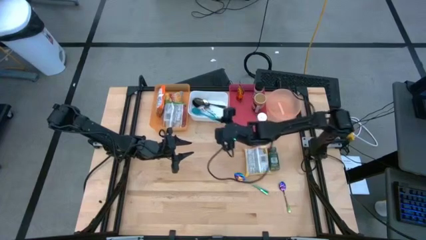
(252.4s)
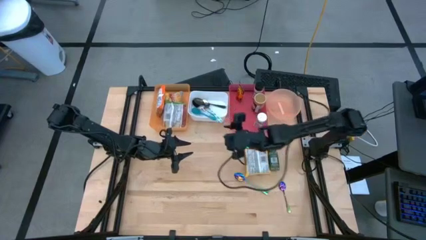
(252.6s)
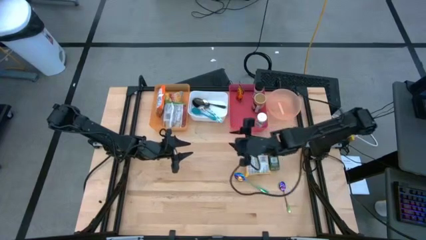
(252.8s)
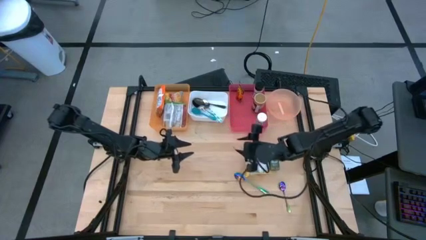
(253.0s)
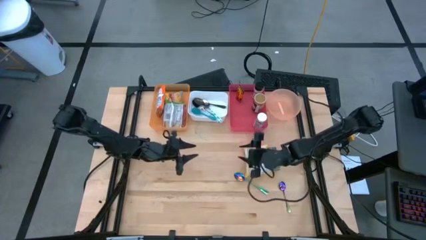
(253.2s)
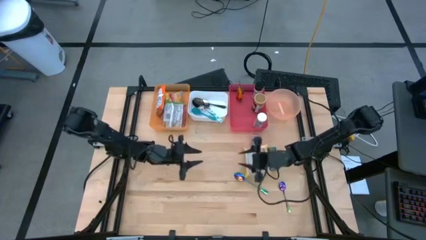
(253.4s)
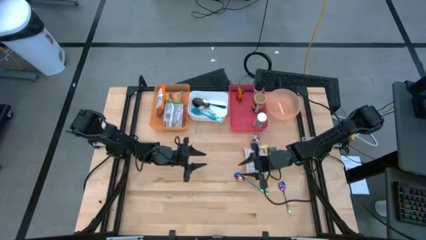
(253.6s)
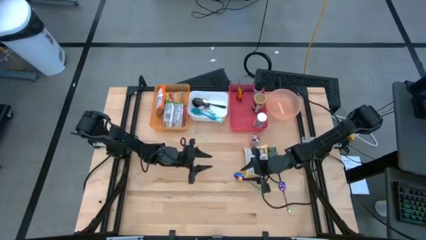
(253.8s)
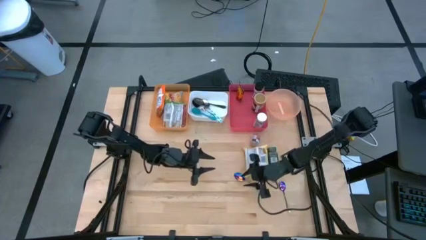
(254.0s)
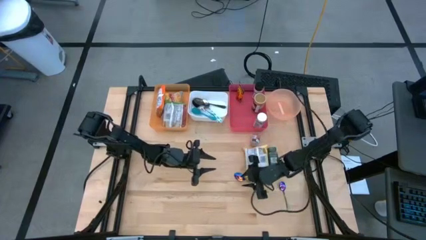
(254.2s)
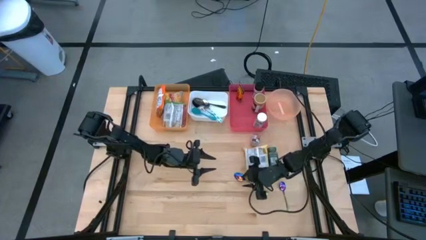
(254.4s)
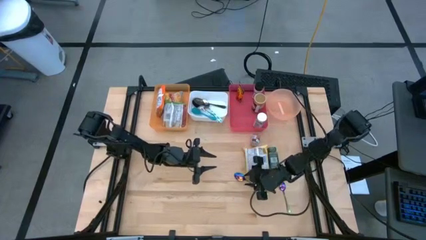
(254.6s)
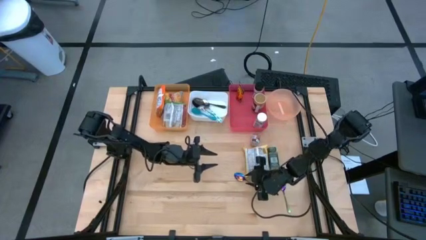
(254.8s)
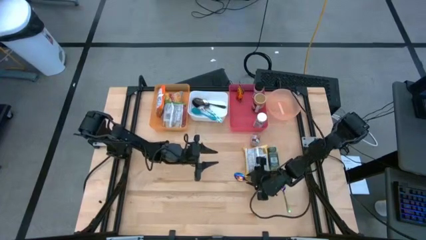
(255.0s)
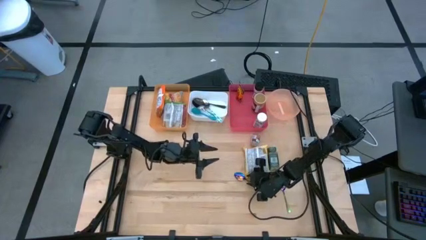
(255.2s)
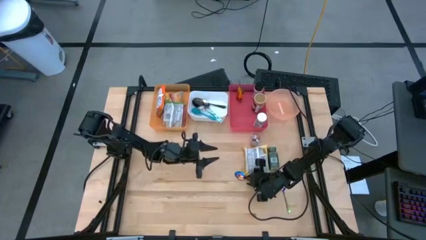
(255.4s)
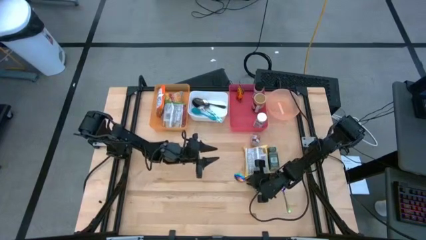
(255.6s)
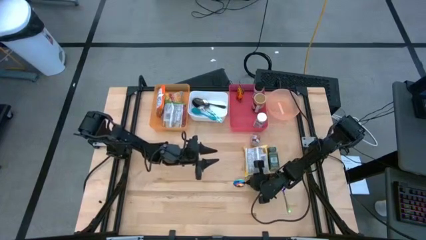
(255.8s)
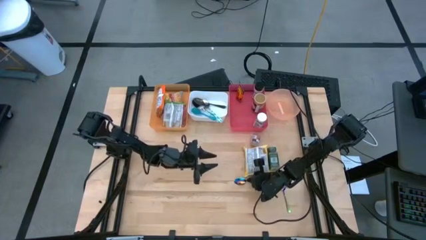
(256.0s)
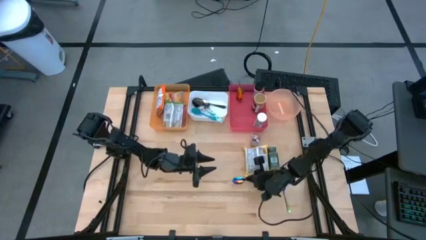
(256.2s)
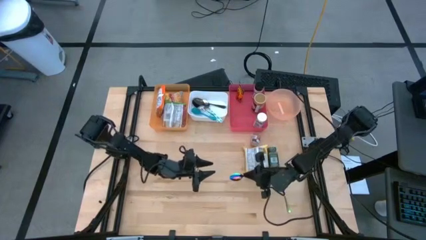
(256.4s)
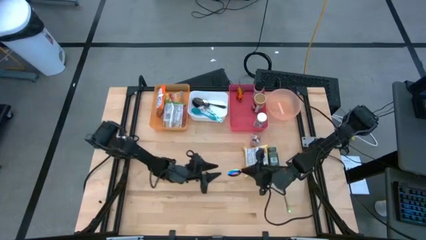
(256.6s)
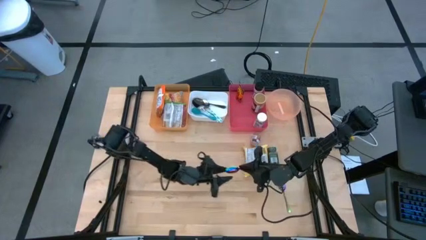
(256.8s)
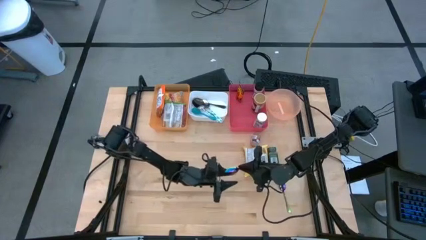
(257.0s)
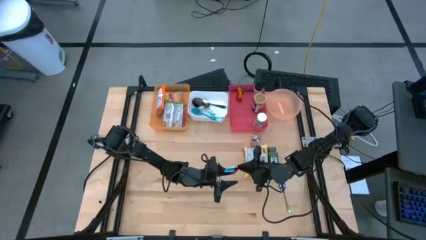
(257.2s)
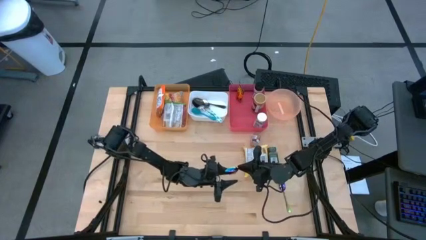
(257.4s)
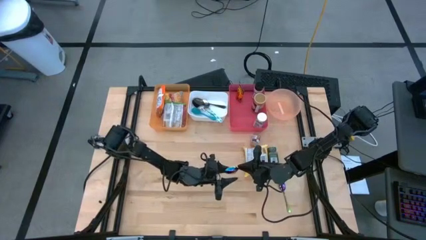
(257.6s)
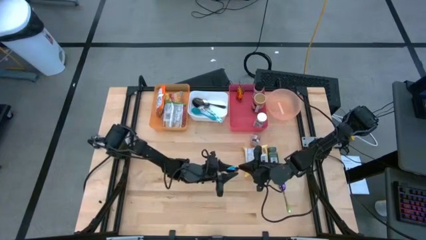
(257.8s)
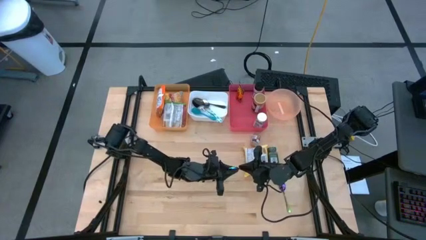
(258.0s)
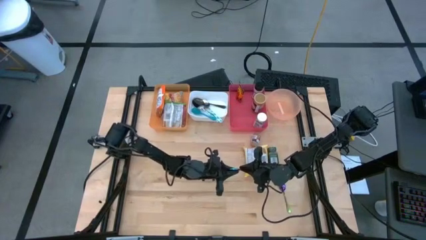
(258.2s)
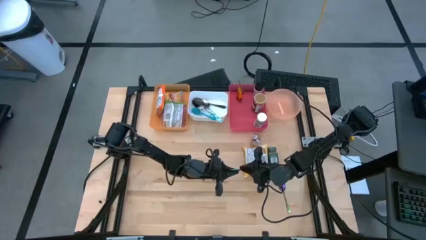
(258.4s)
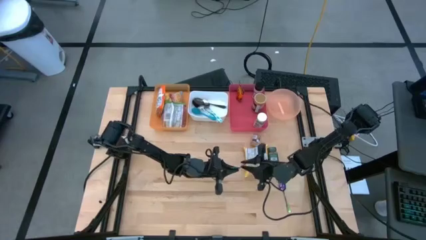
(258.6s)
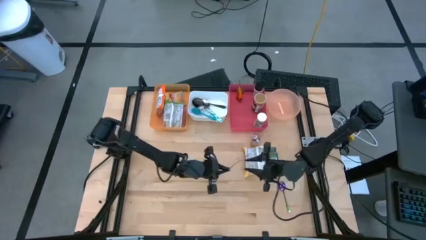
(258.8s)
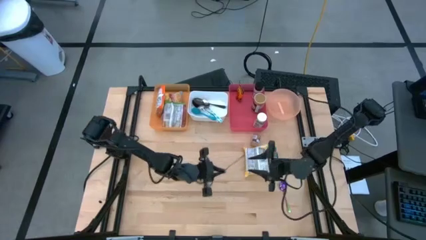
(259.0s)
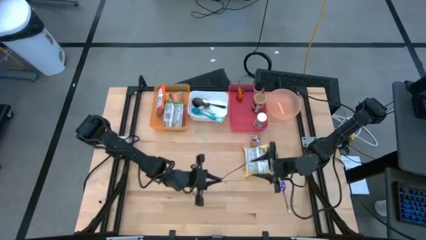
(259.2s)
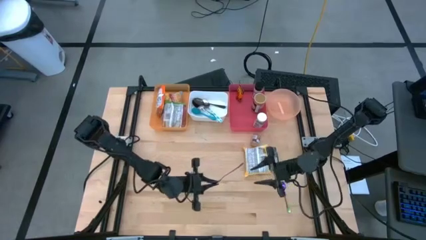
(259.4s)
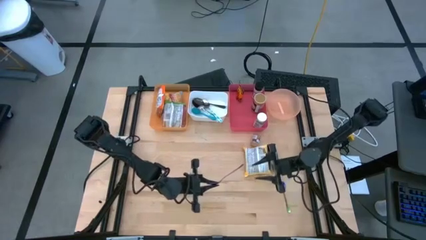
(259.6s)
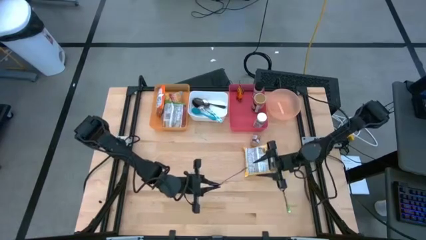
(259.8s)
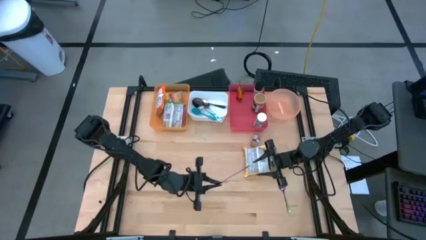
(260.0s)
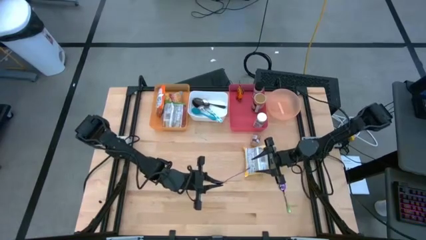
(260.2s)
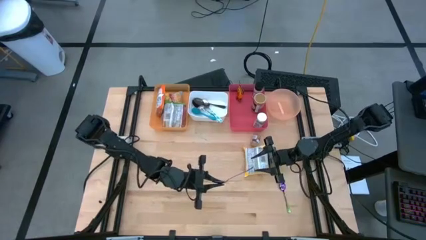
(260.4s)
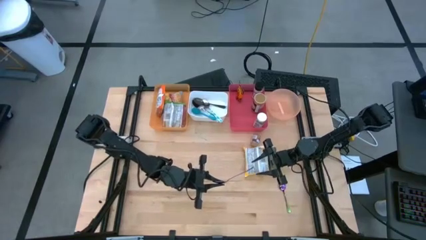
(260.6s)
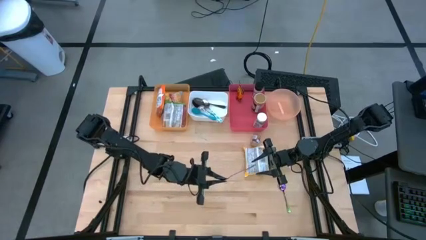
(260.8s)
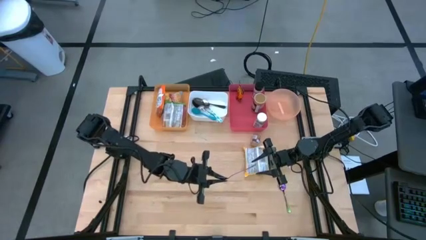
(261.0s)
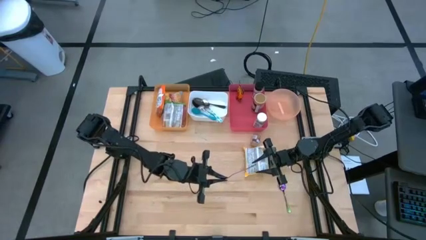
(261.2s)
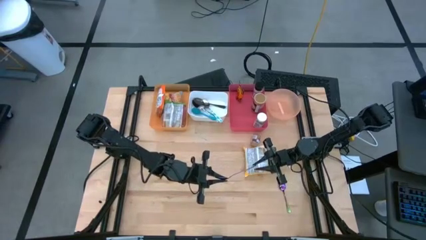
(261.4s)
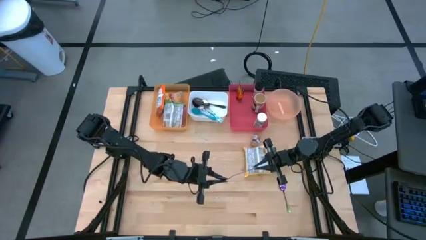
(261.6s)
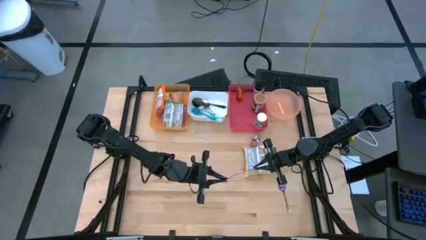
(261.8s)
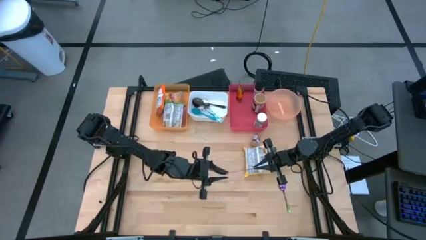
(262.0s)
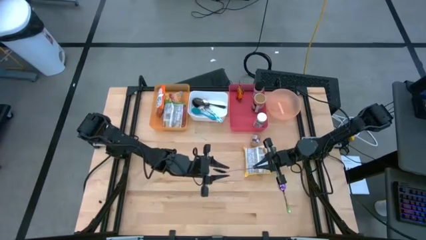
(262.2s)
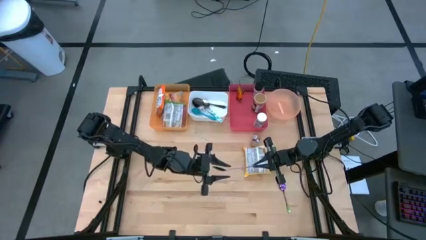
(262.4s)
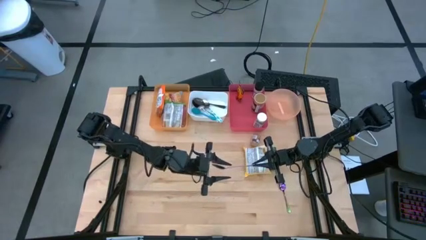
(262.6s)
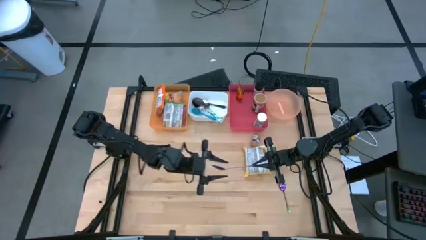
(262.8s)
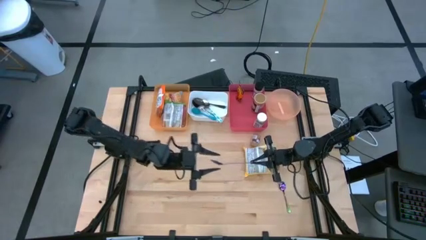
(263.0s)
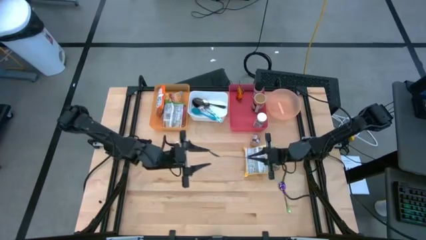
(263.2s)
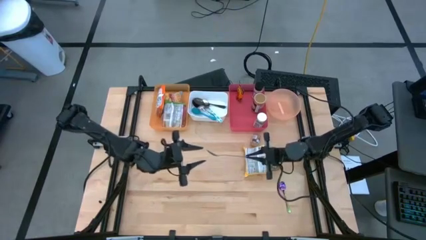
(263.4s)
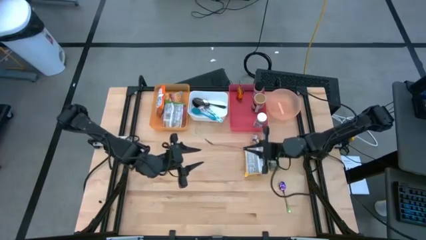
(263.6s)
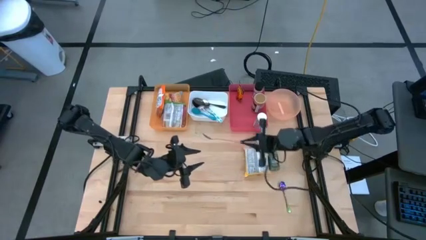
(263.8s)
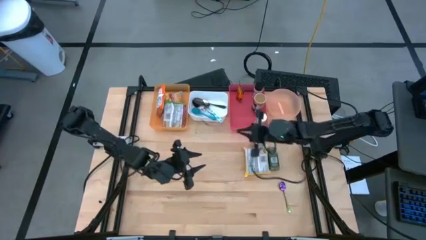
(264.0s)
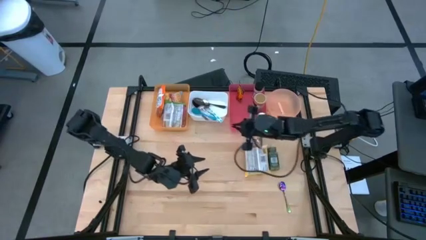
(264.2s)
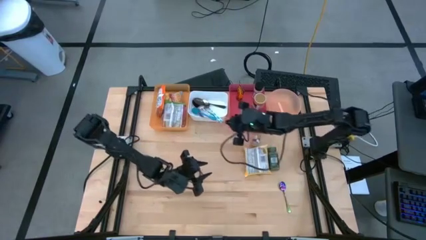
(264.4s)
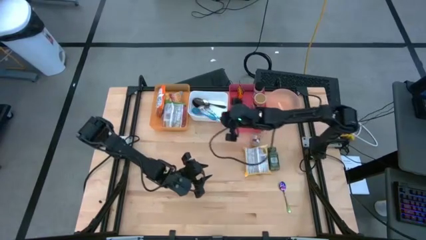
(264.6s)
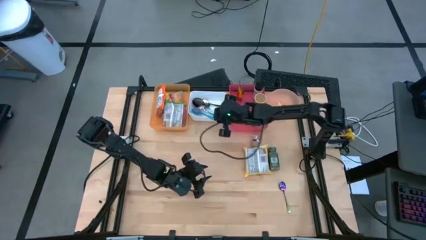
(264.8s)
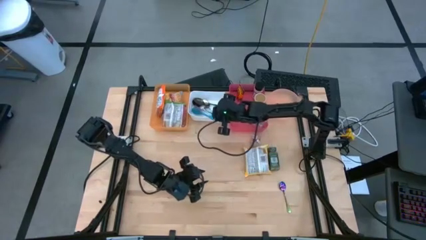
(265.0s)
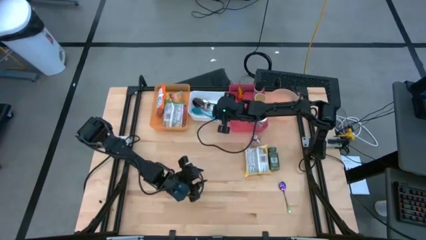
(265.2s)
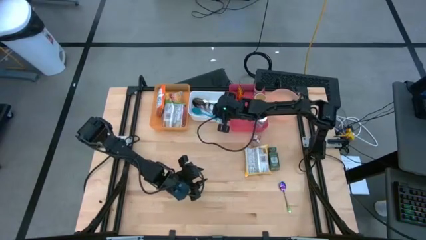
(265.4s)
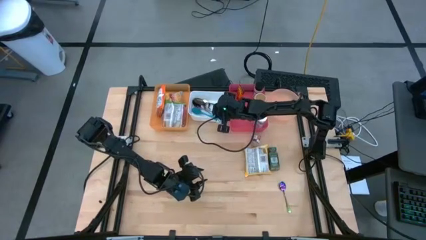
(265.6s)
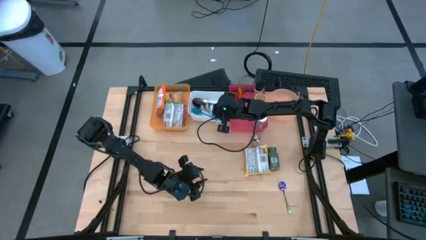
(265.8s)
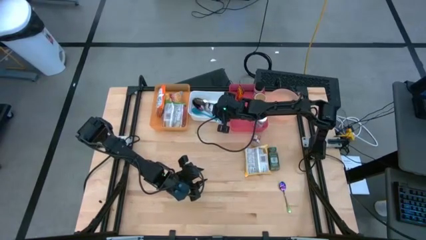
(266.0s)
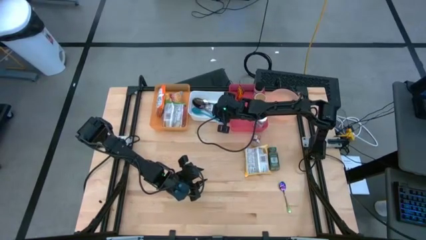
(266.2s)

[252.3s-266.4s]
Task: Pick & Place Food Item
Put the left purple spoon into the white bin
